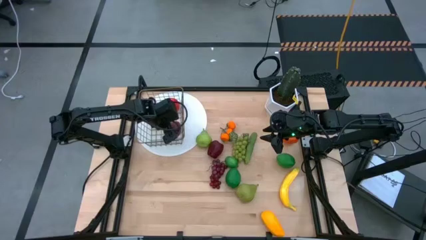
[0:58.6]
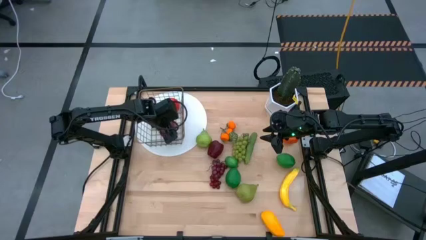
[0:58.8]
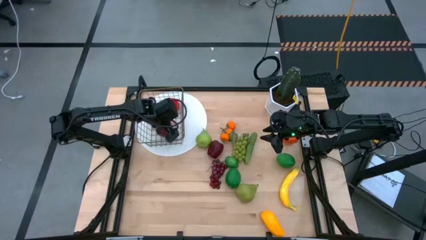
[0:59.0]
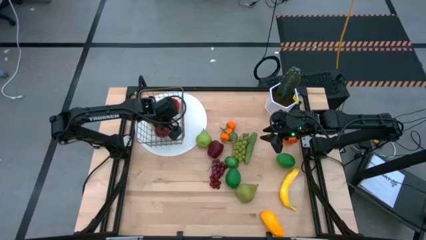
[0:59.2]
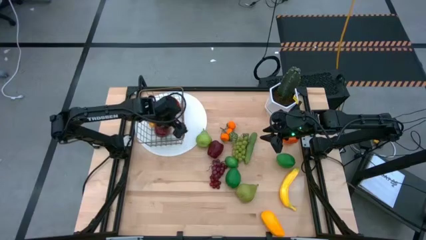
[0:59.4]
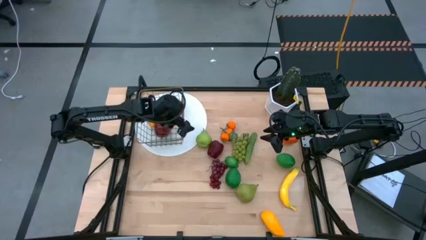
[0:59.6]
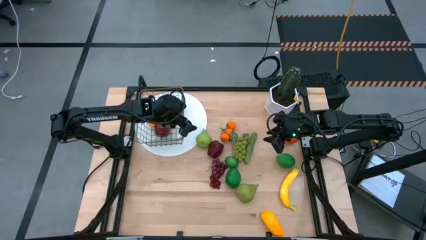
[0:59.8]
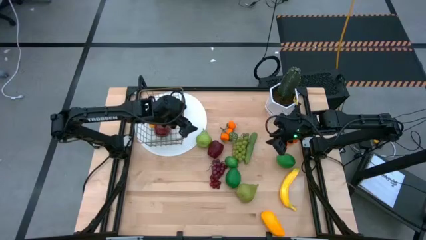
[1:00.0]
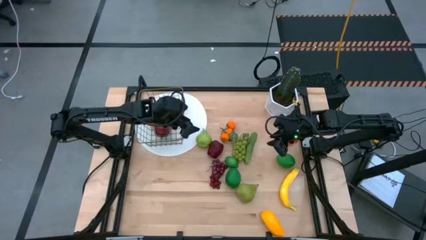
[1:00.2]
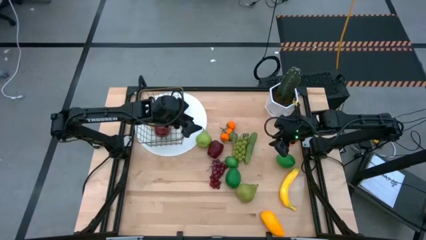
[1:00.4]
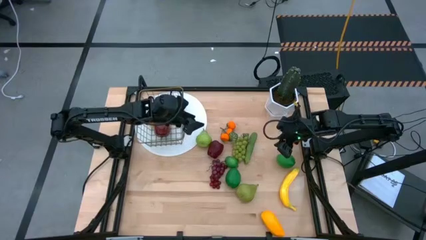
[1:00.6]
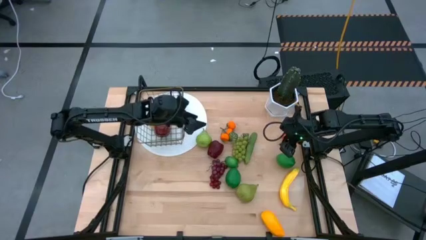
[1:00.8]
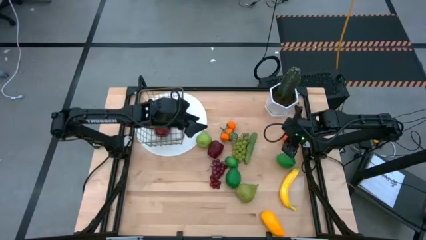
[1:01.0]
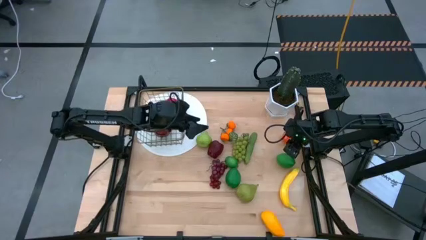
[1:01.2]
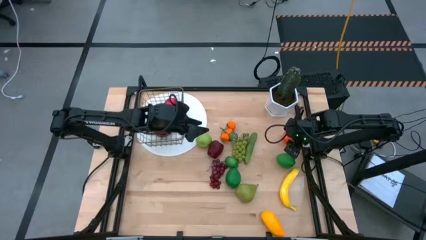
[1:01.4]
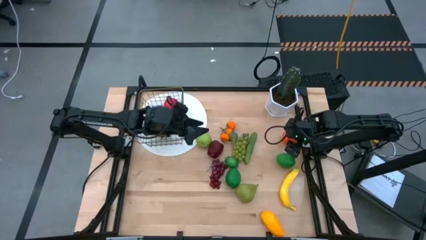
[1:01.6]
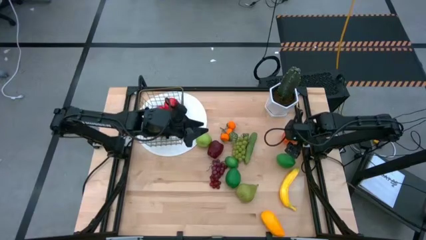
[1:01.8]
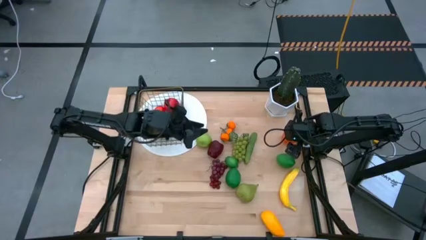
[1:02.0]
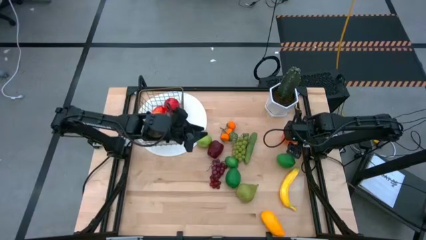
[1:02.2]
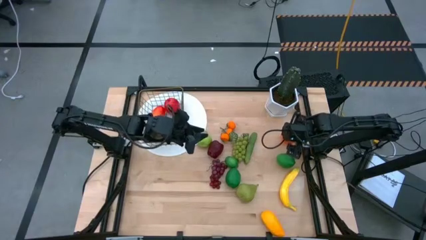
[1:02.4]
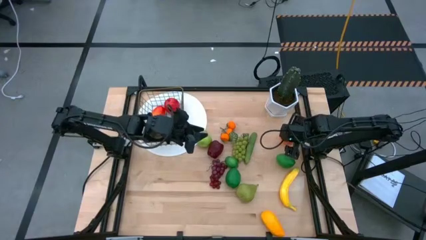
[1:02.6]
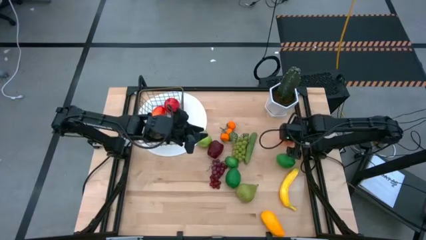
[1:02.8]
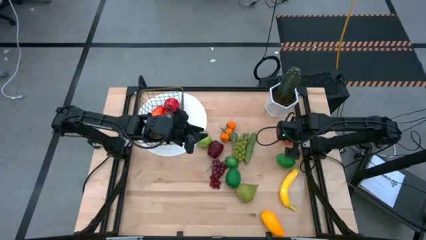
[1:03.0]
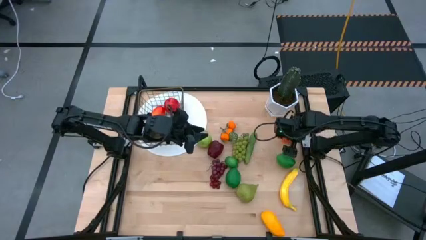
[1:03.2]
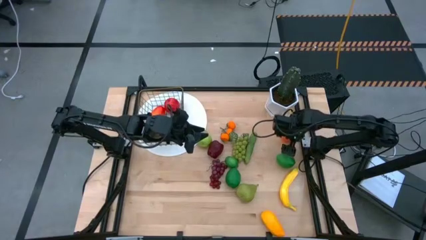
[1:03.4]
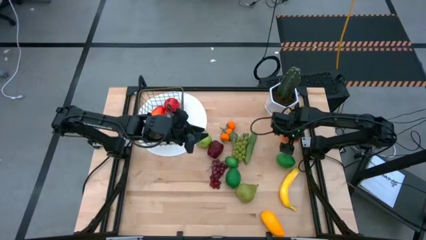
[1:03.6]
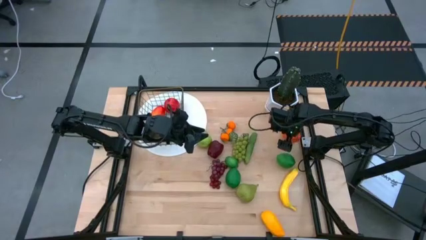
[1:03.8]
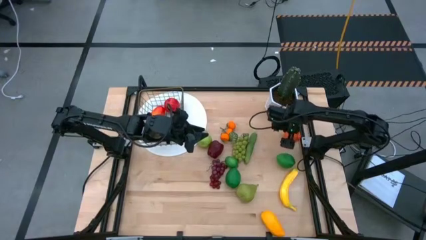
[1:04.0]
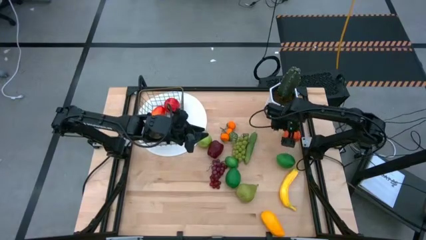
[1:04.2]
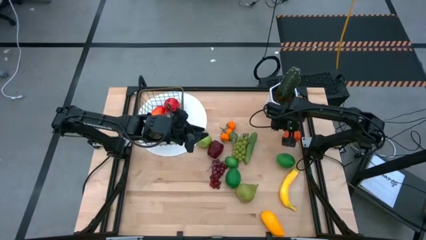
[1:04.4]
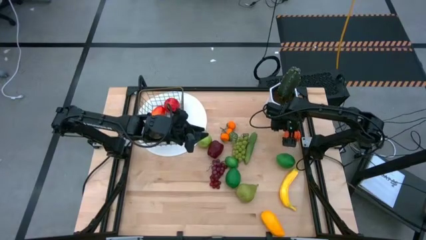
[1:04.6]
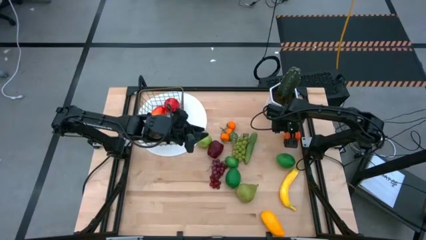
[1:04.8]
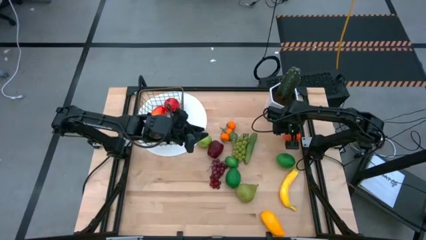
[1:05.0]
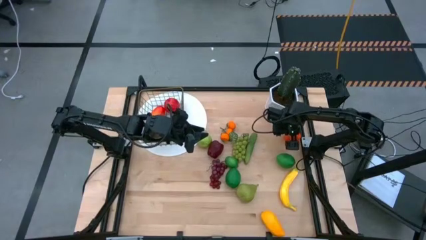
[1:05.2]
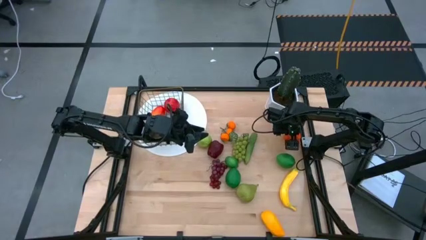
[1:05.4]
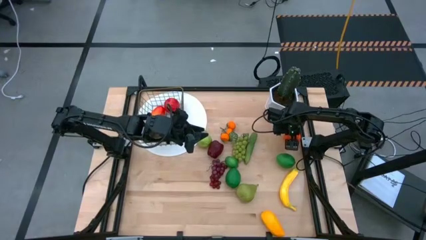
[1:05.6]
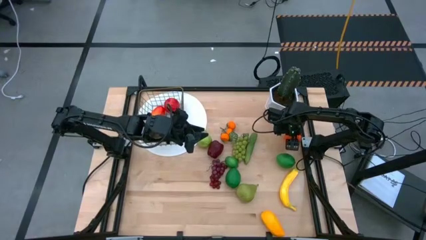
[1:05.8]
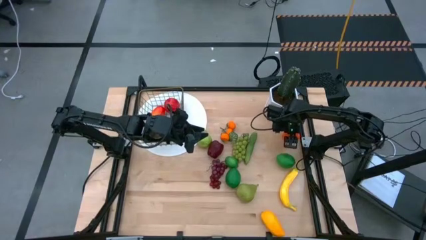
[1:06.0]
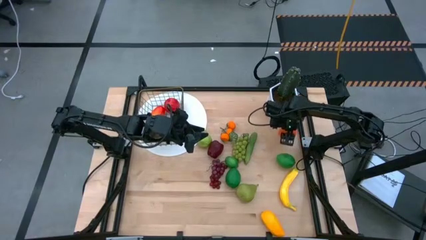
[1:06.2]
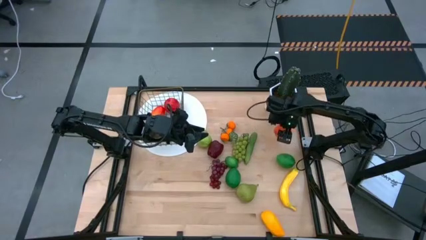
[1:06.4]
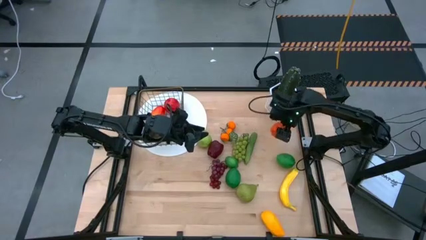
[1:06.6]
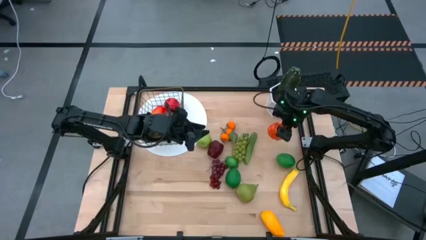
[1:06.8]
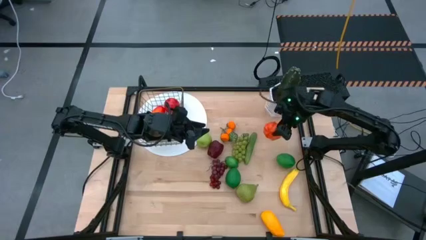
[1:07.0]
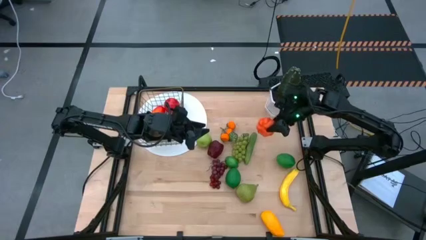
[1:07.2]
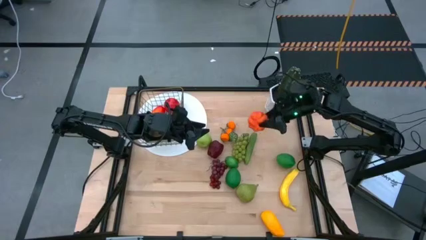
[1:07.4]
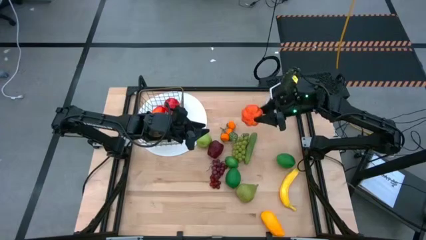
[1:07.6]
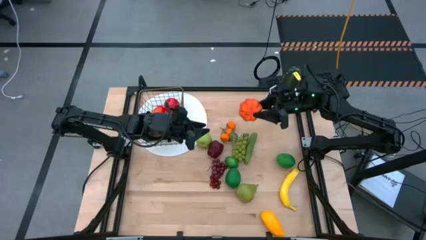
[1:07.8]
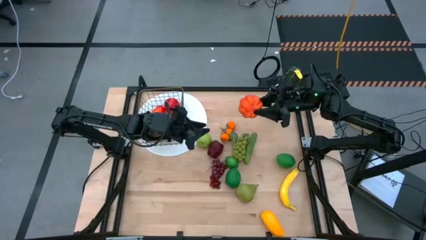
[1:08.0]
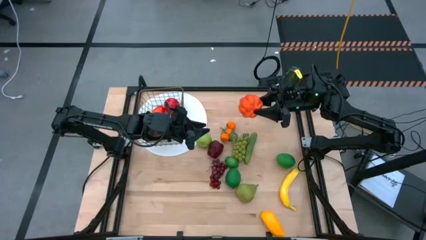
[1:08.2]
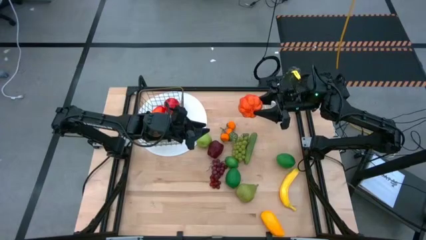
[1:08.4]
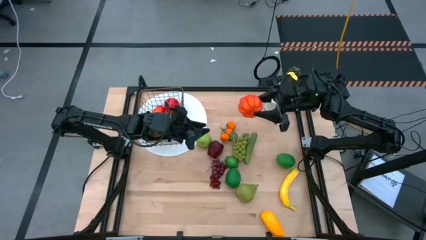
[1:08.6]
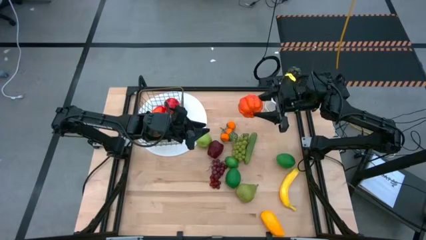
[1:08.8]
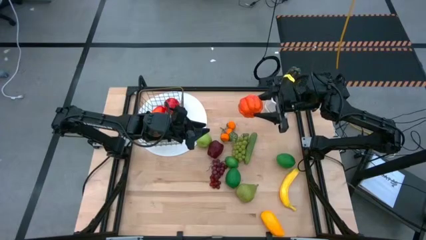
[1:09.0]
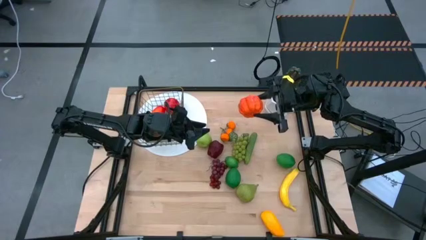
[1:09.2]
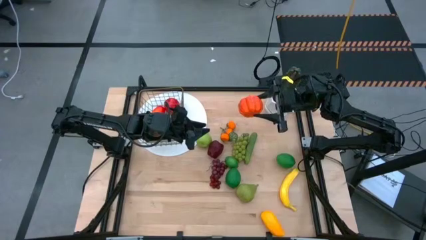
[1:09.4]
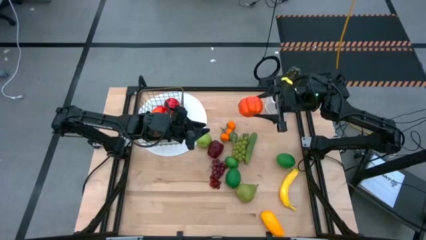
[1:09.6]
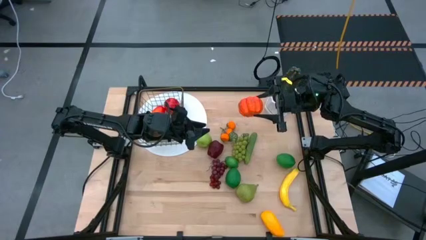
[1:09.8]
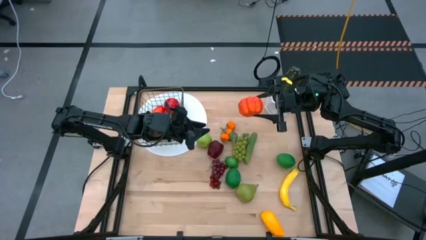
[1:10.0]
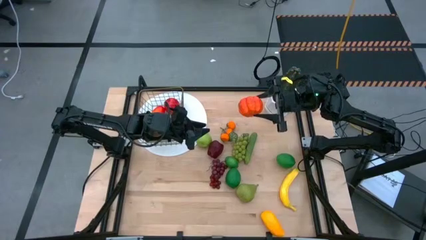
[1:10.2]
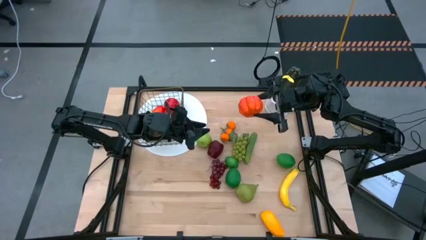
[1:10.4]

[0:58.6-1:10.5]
Task: Build produce basket
Put the orange pumpkin into the wire basket

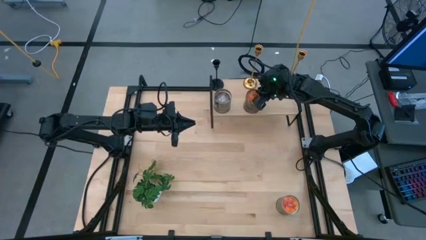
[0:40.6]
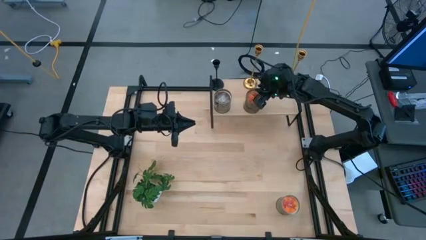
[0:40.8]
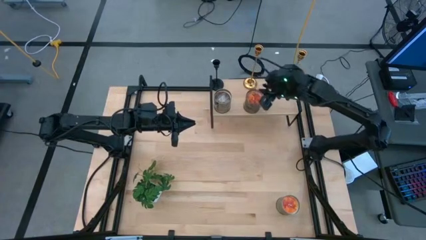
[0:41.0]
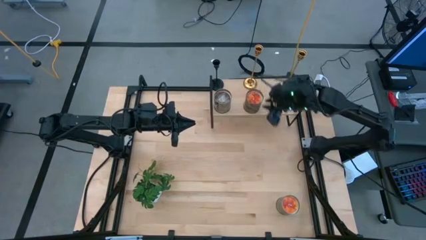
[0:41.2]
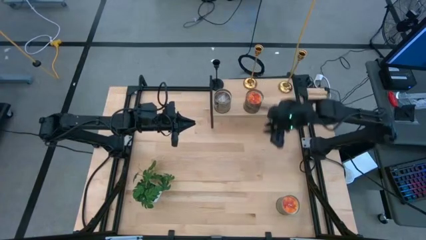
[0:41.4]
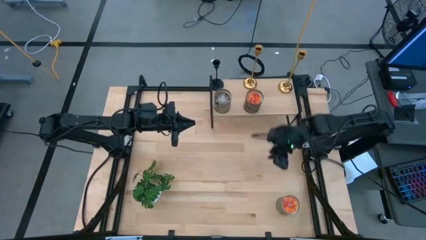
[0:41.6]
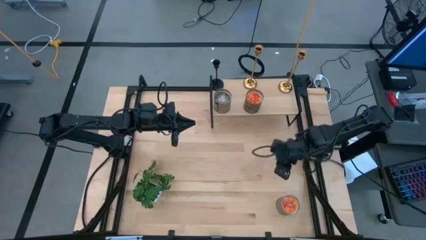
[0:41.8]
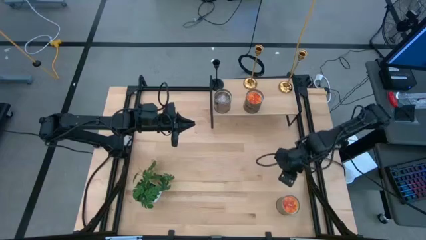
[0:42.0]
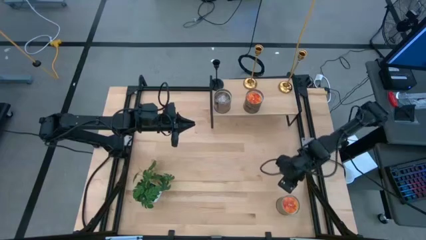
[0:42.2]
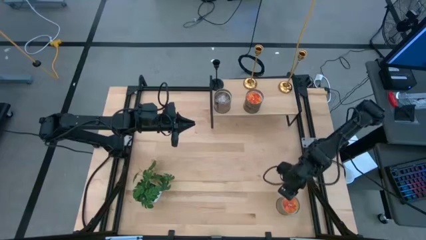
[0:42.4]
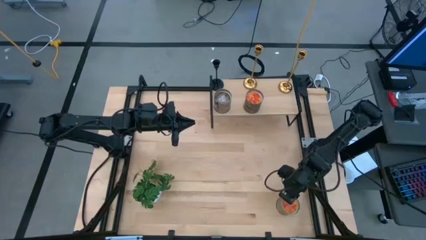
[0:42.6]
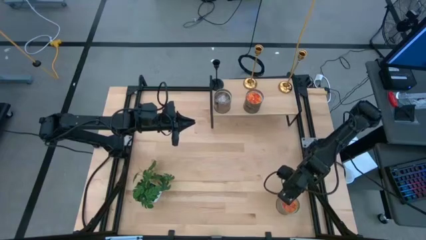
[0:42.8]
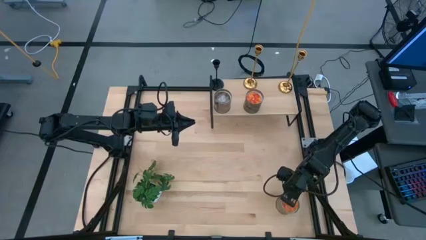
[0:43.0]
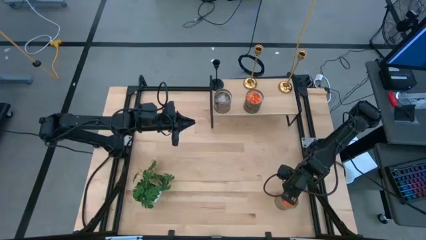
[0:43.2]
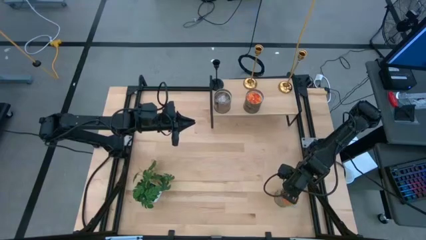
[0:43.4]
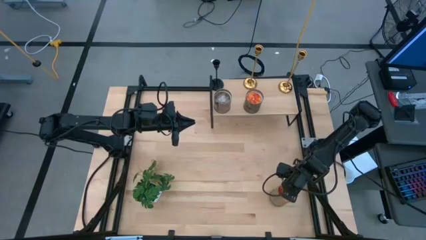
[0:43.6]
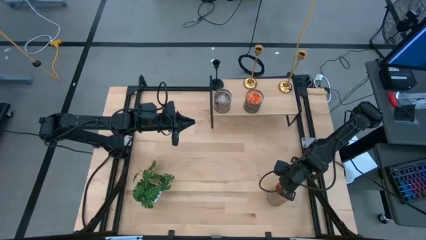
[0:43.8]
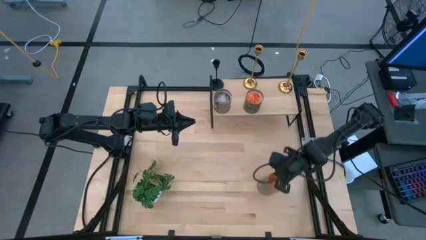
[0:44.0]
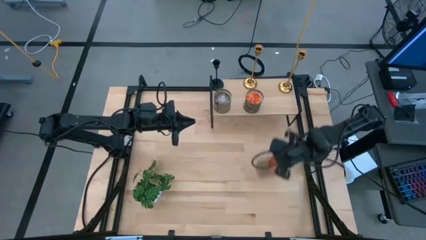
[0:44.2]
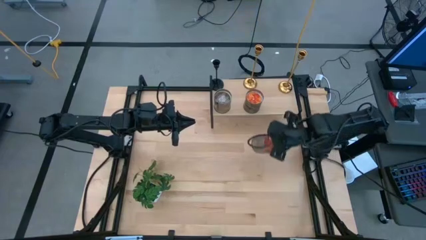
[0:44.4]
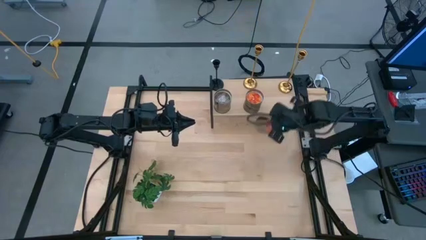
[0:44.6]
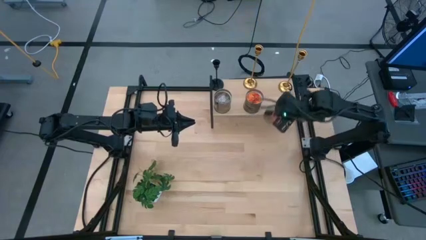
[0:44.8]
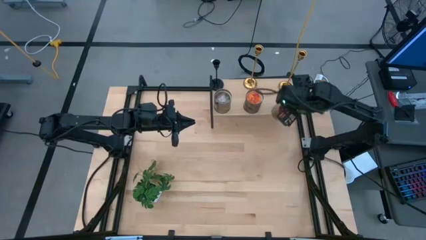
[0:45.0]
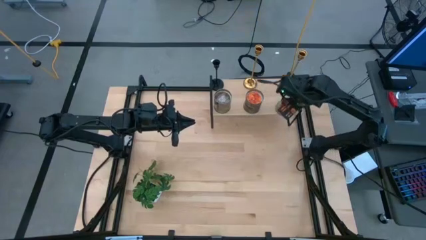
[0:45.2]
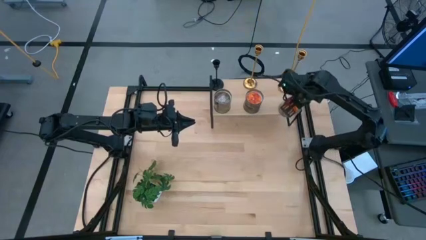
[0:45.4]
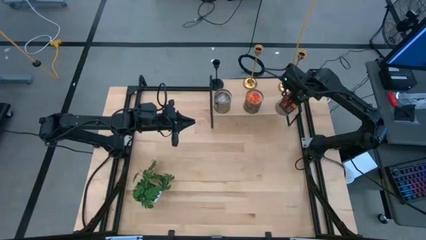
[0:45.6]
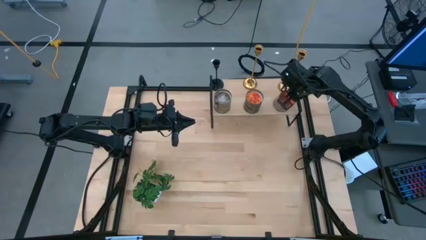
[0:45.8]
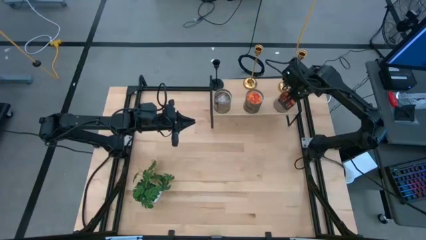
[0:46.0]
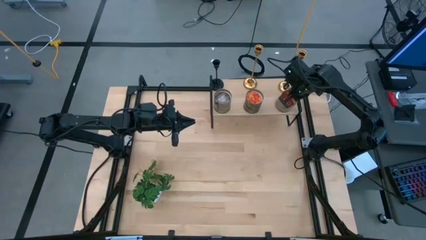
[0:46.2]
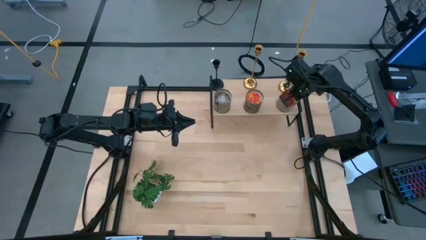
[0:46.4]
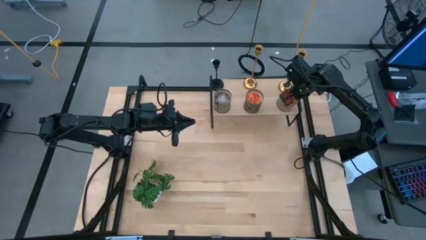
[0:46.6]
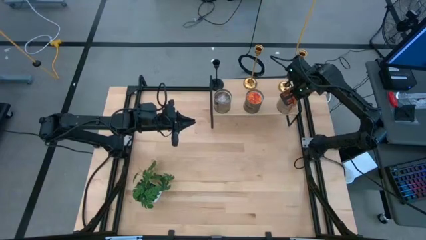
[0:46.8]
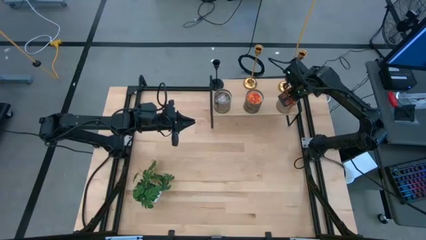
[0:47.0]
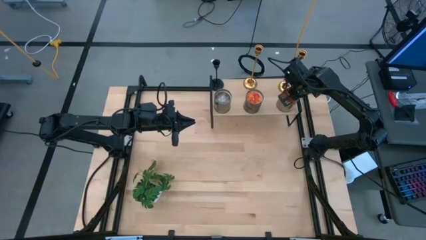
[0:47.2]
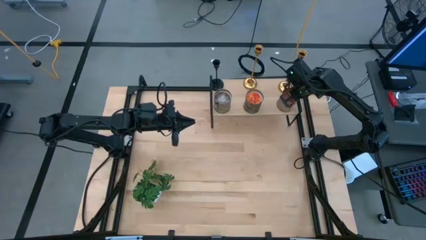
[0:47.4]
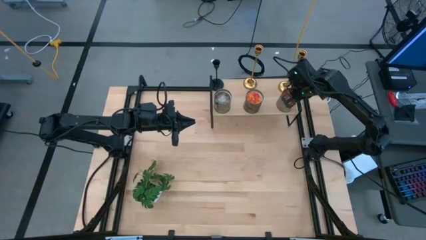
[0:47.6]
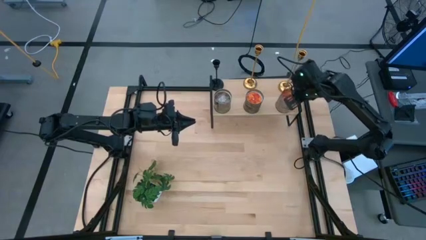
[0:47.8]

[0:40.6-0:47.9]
Task: Pick & Place candle stick holders
Put the orange scented candle on the shelf
